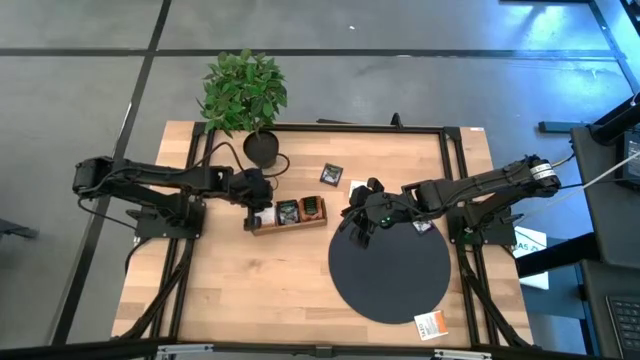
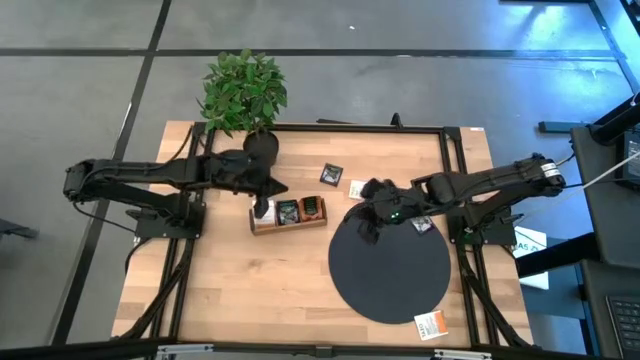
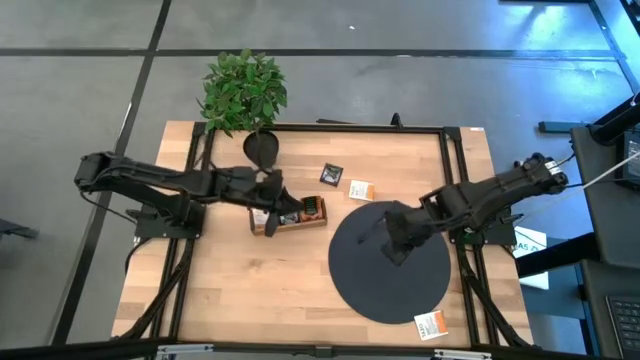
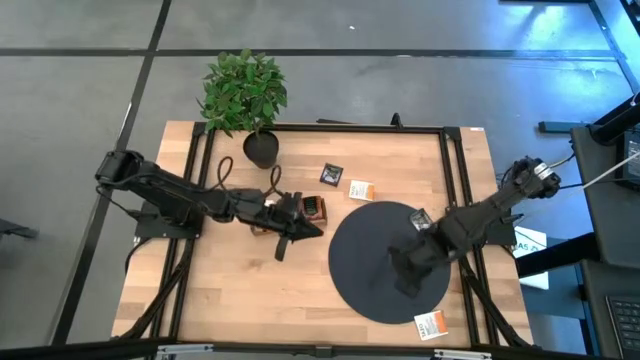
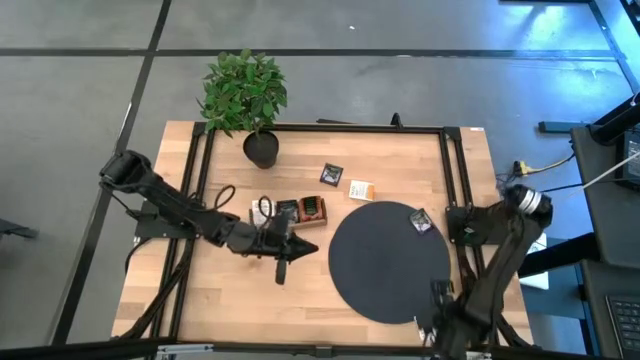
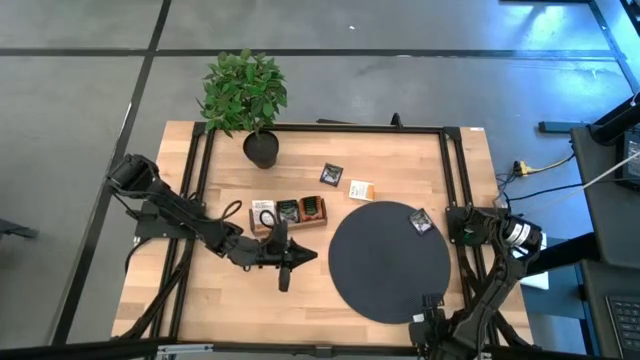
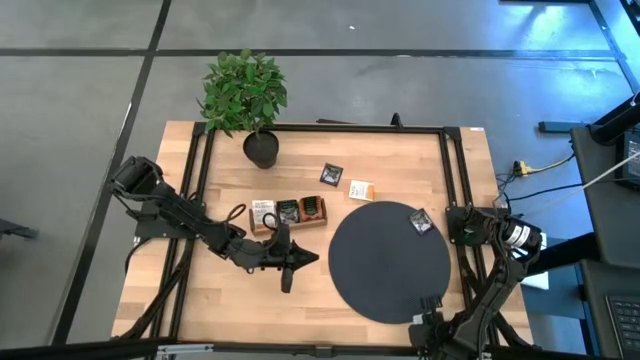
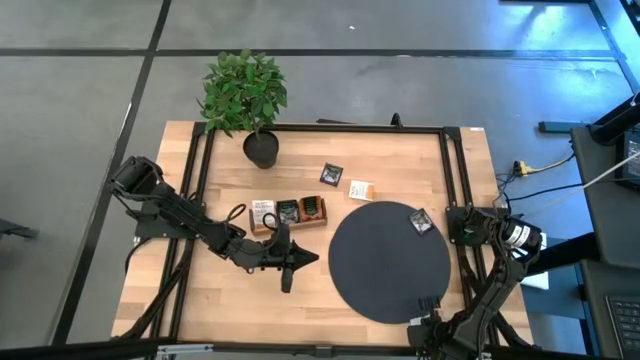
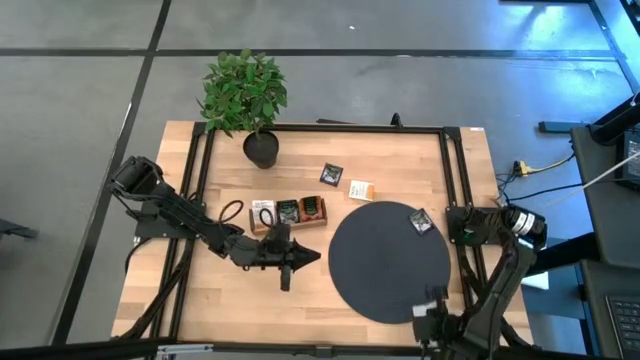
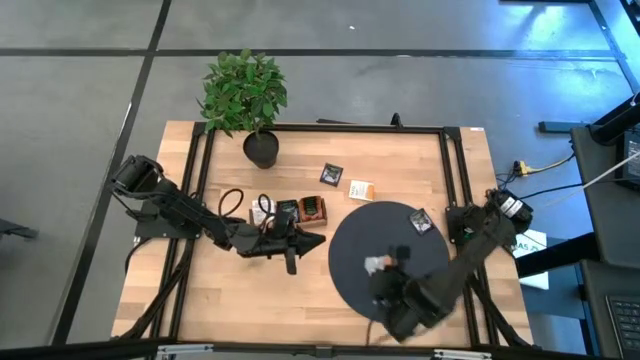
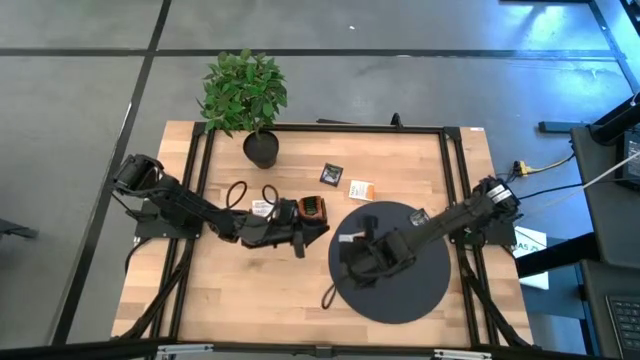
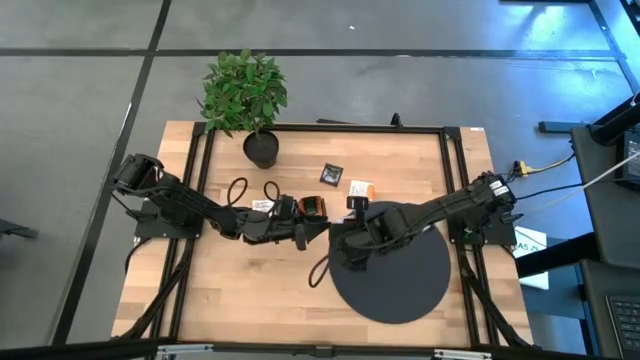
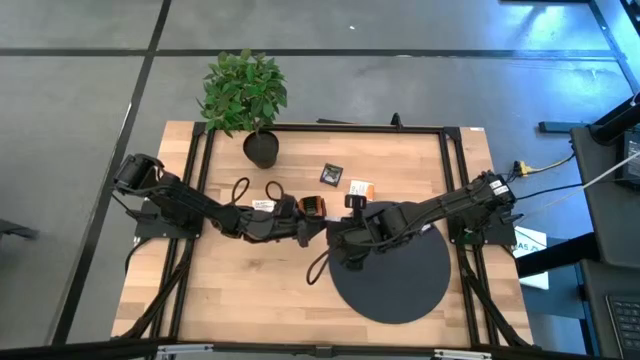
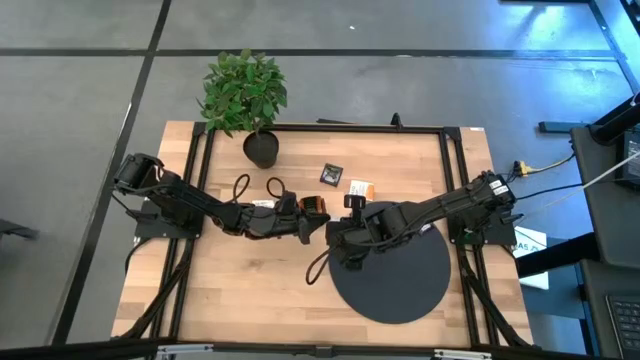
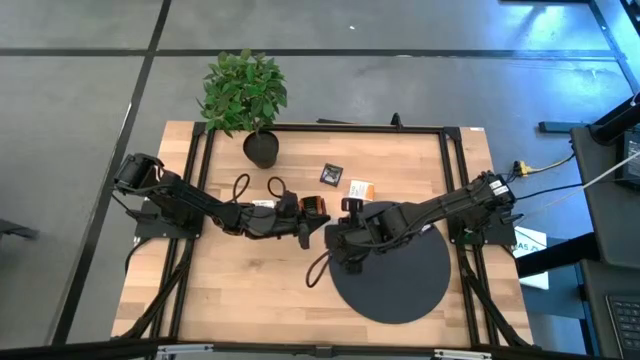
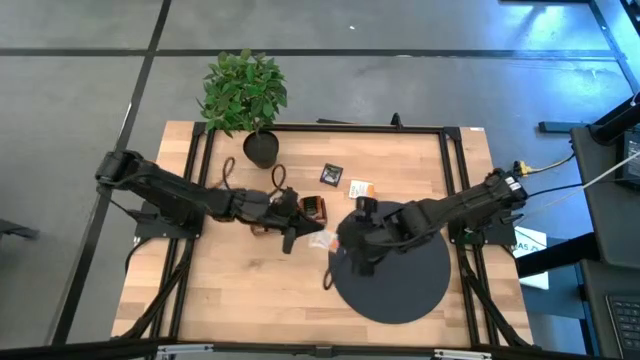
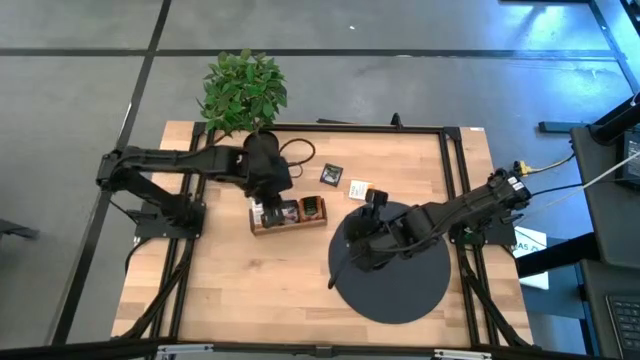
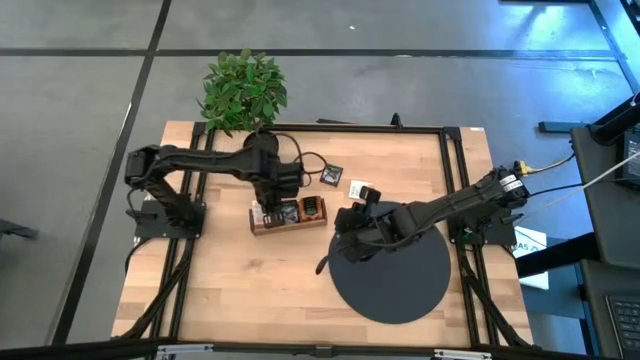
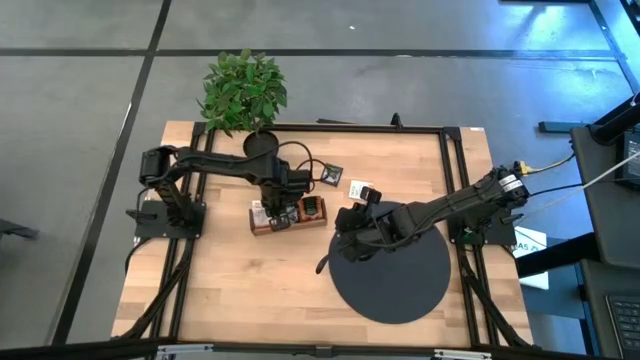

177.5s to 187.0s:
Task: Pick & Place Tea
Put the bottom white tea bag into the left section of the wooden organizer

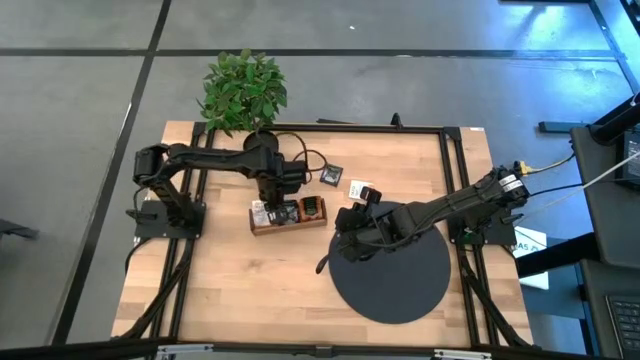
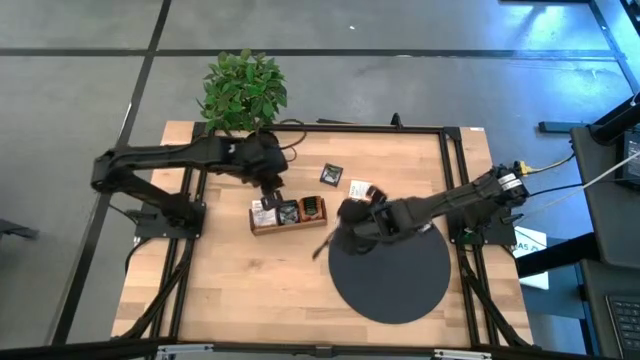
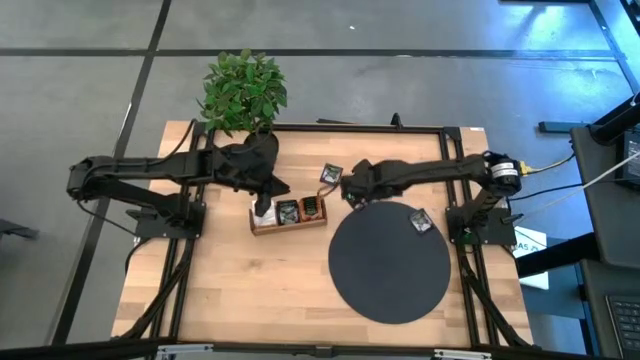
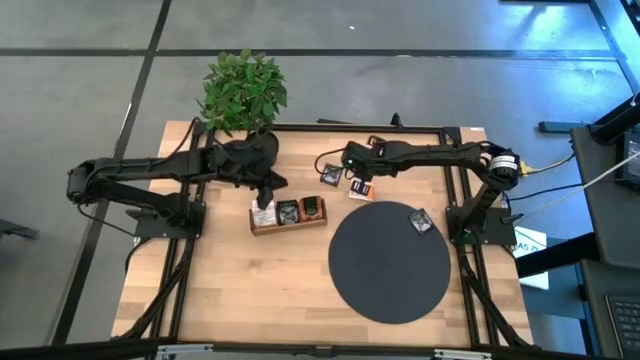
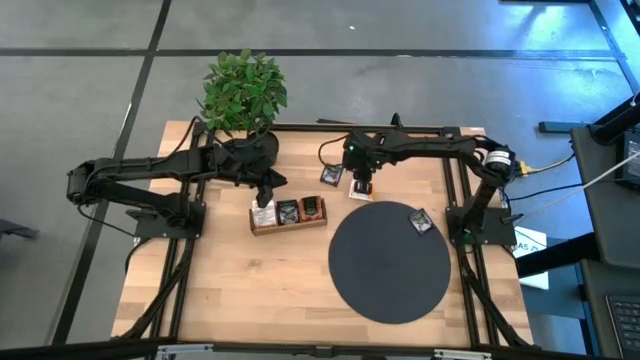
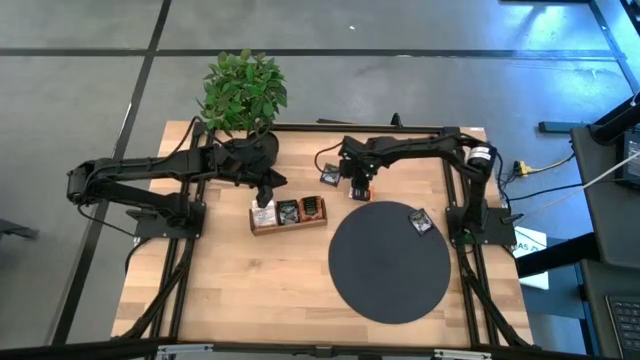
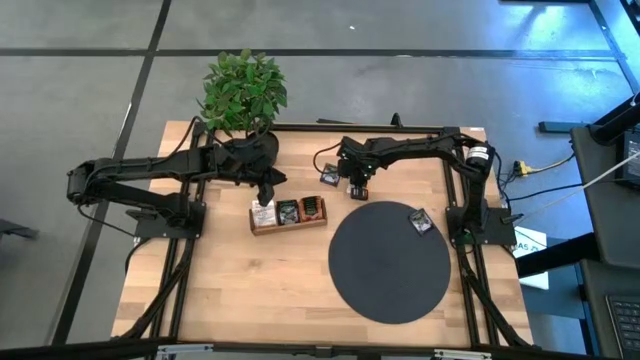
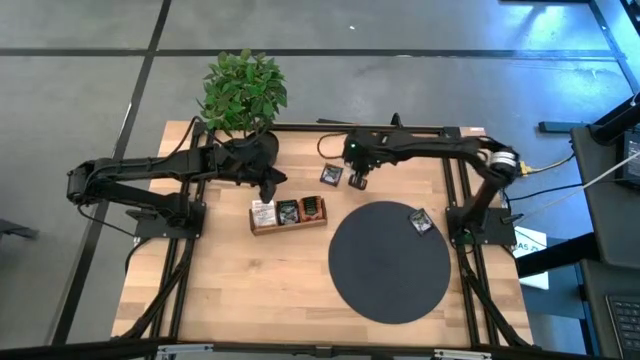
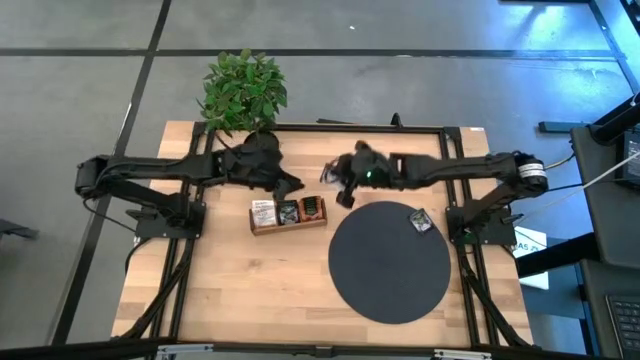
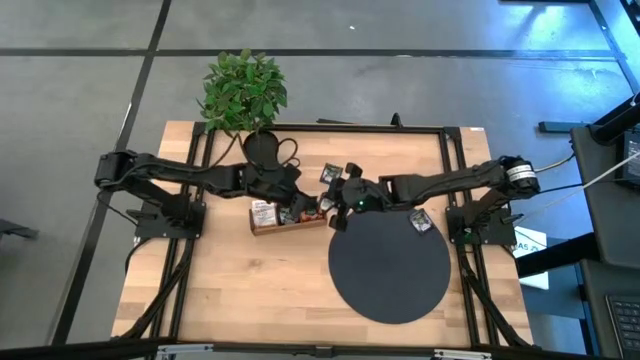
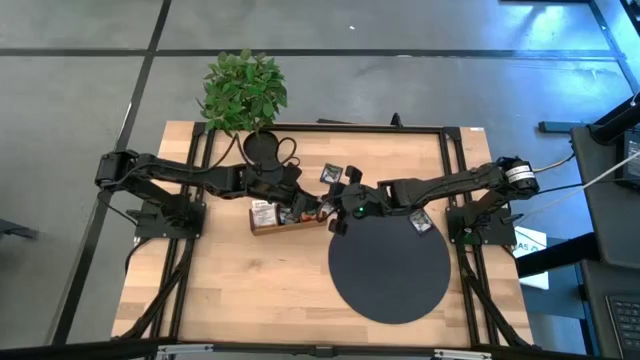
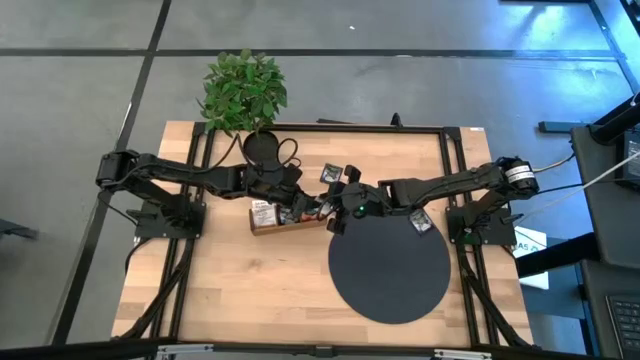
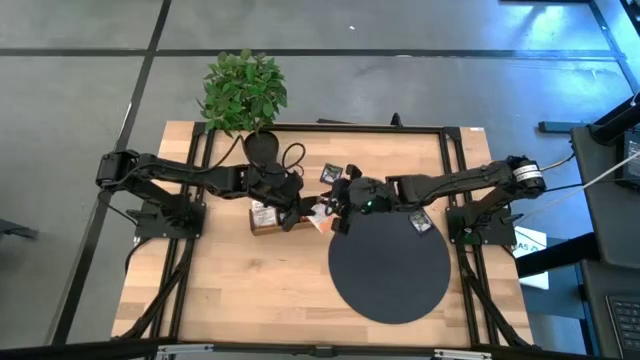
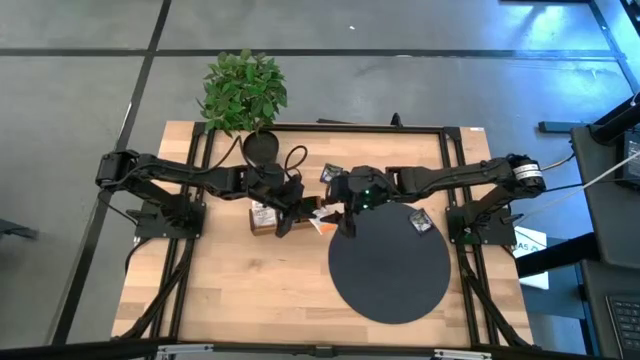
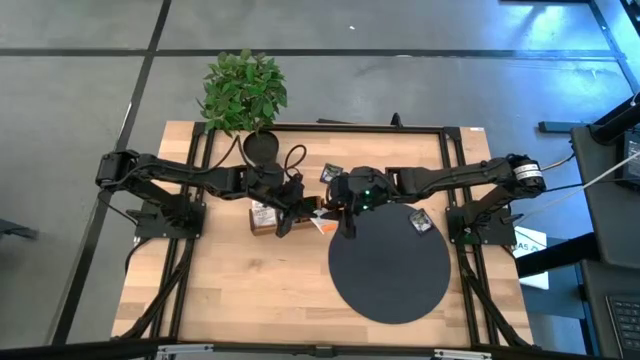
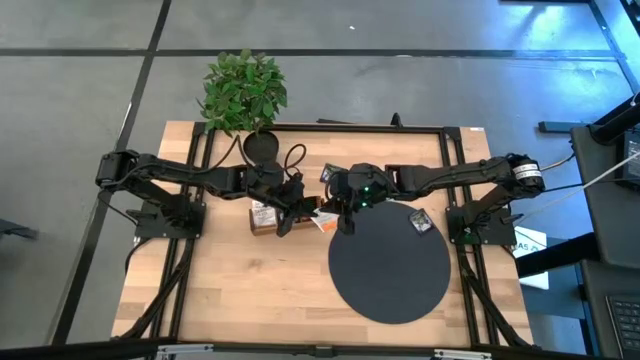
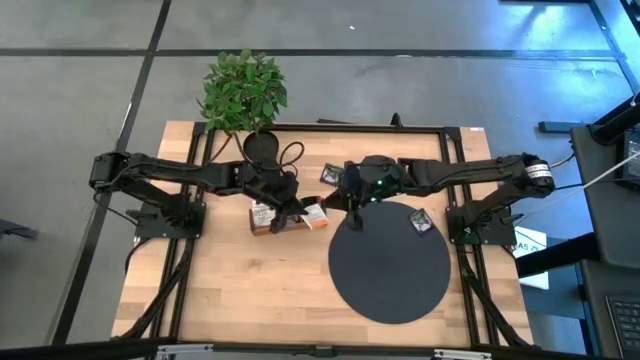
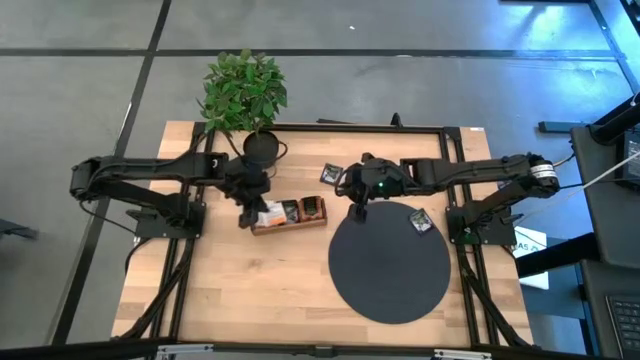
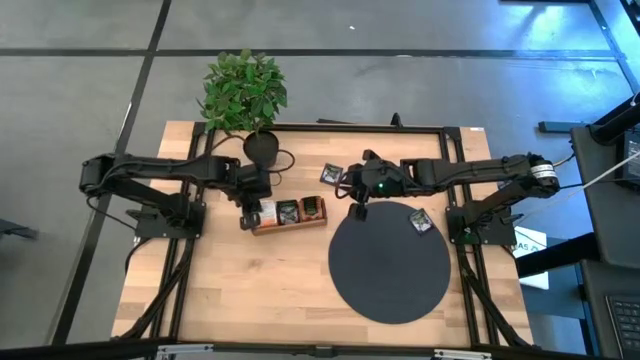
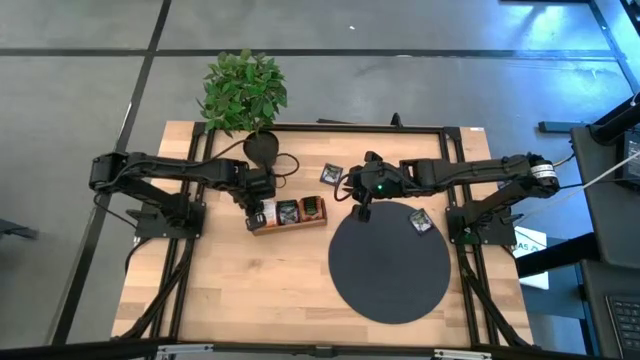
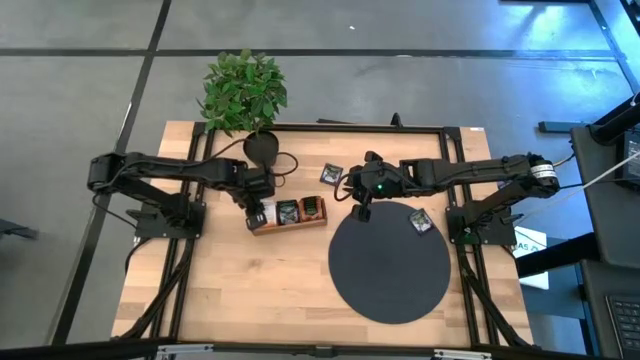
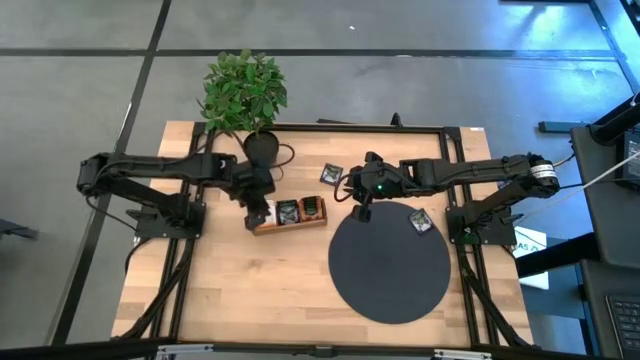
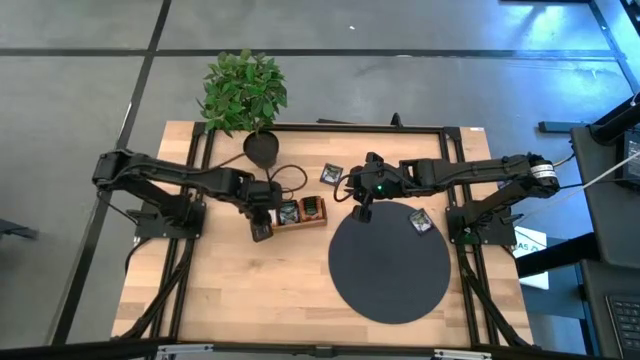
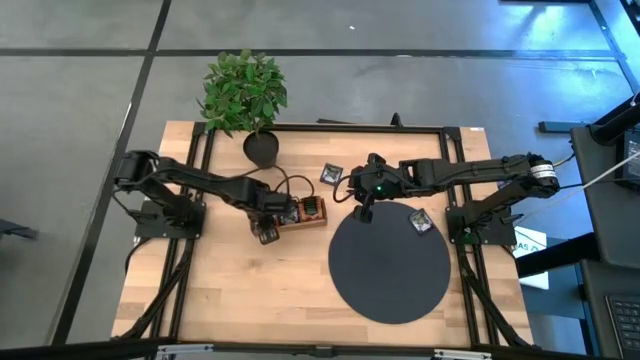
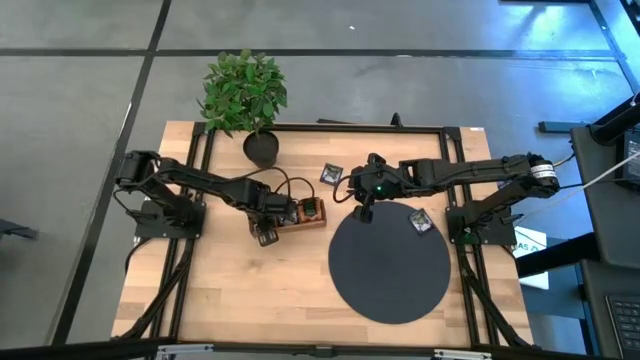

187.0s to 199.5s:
Put the white tea bag into the left section of the wooden organizer
